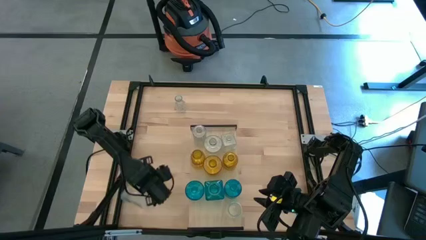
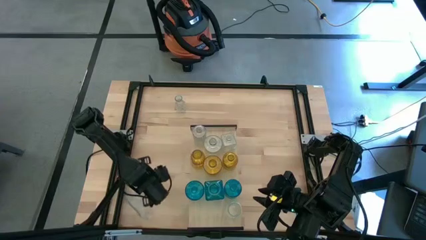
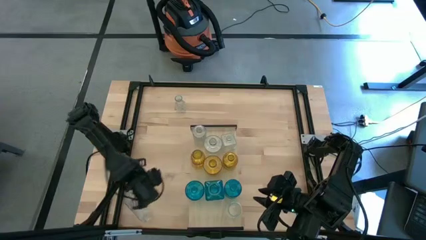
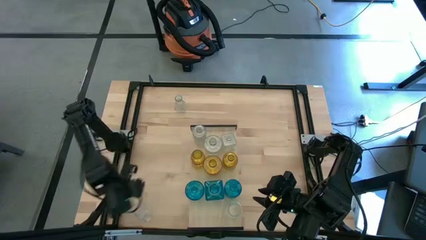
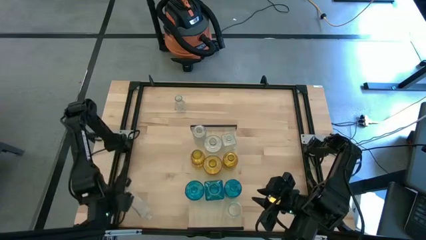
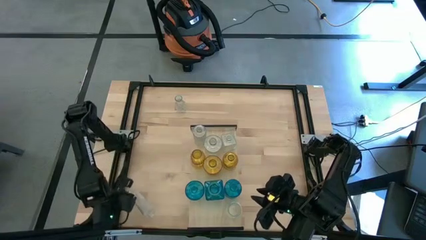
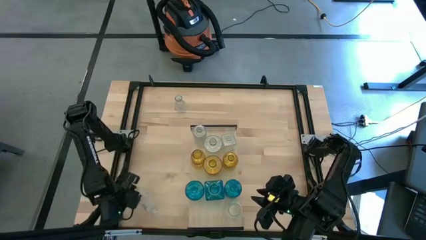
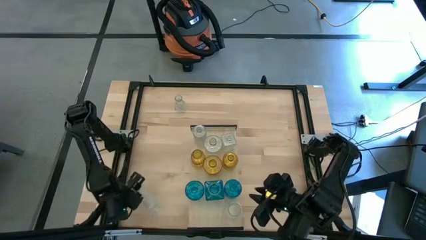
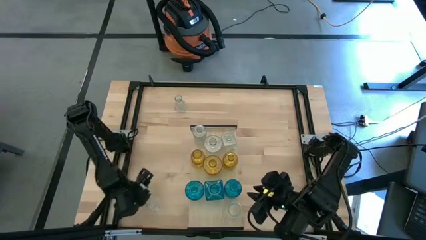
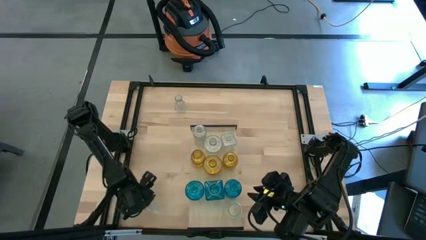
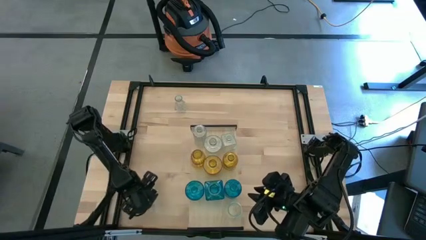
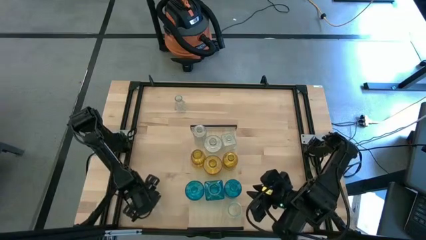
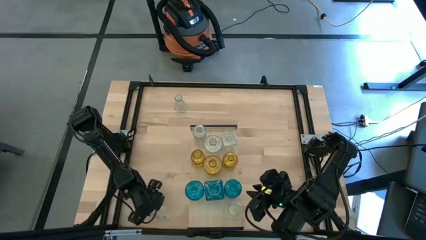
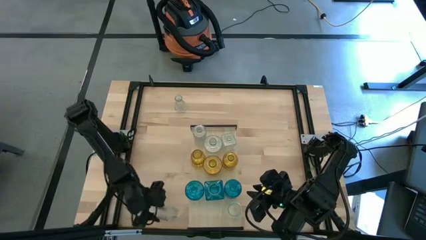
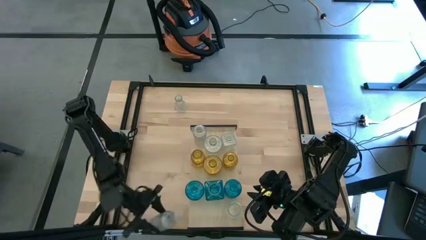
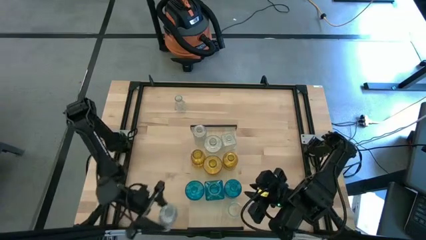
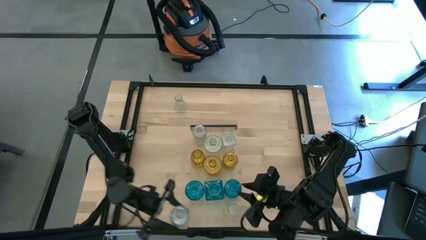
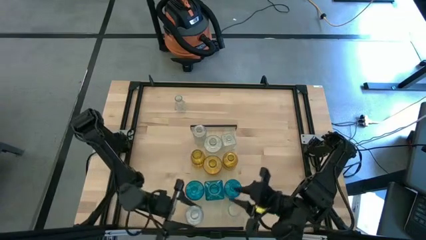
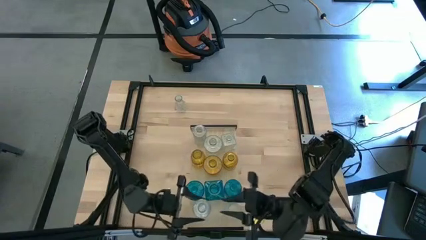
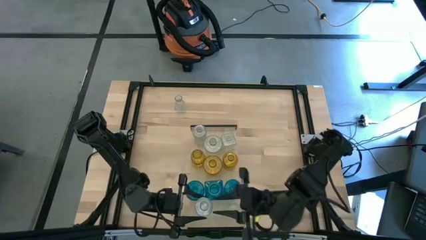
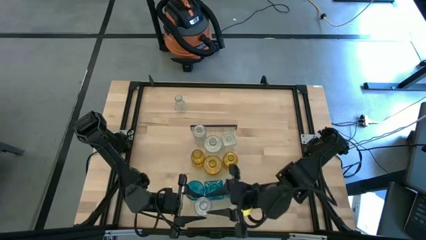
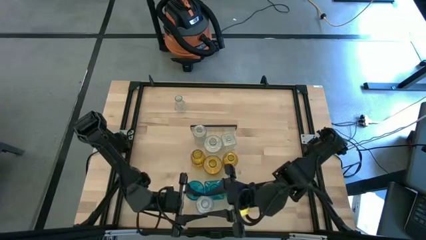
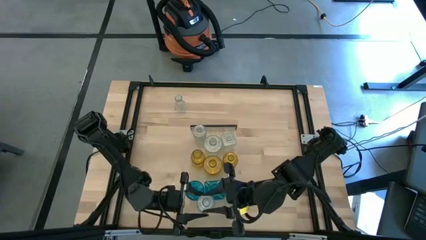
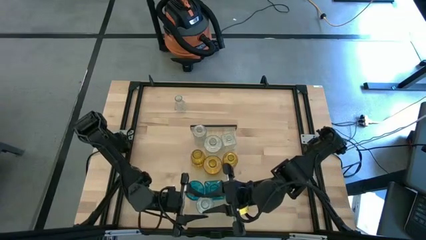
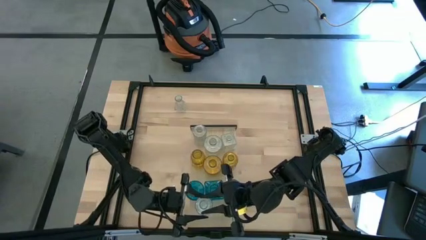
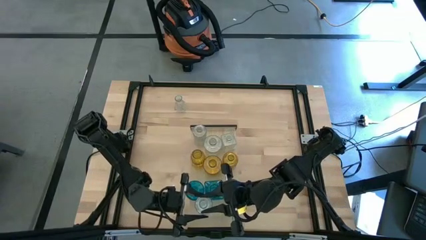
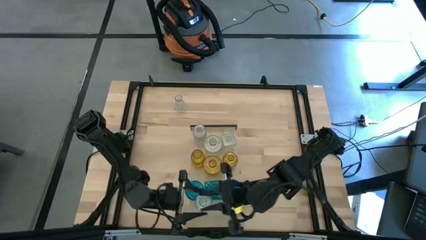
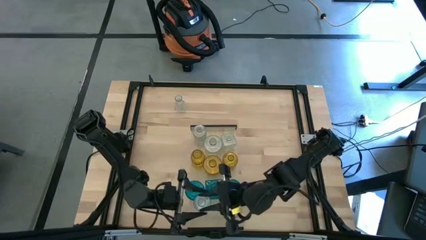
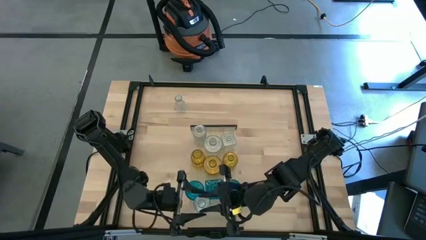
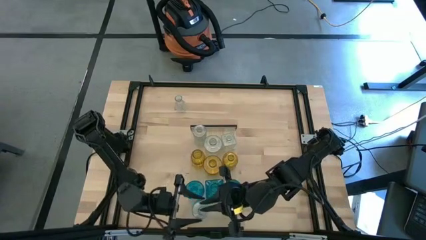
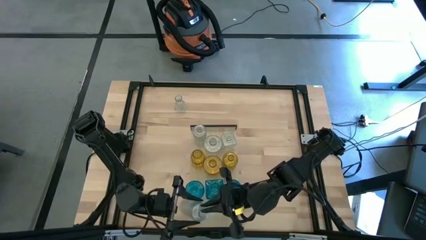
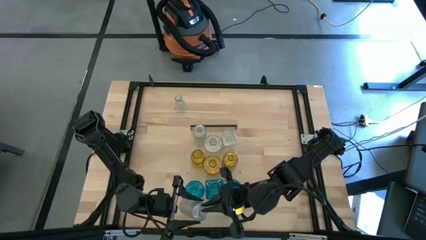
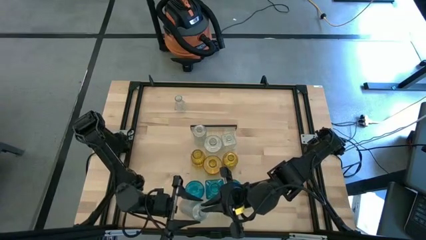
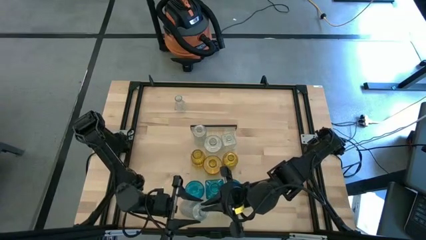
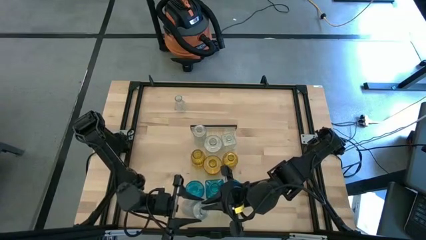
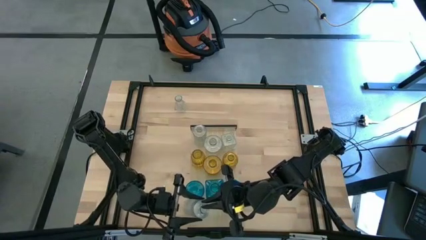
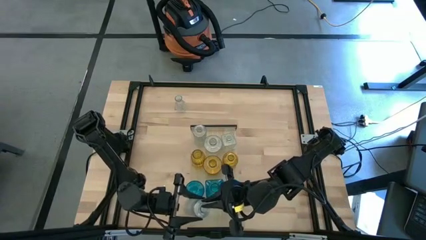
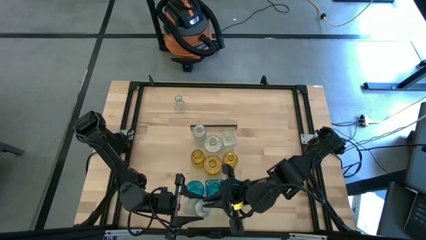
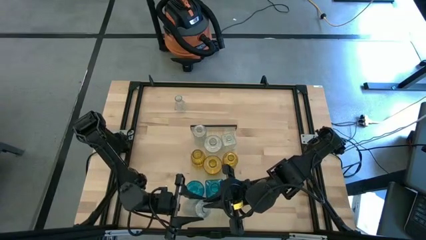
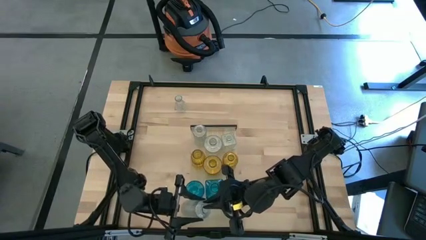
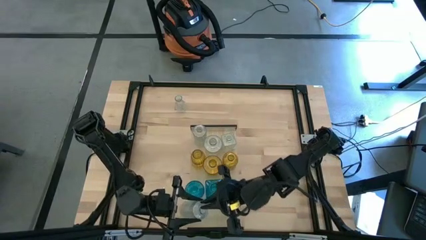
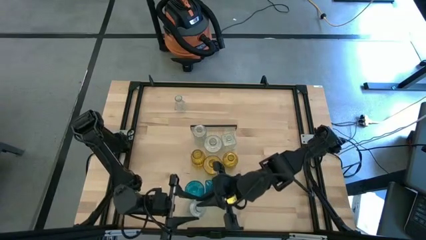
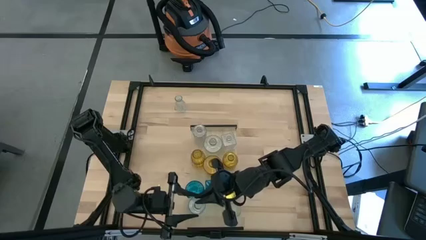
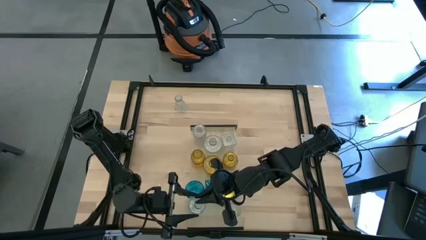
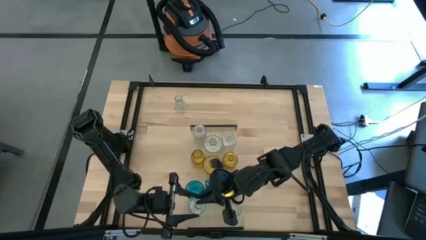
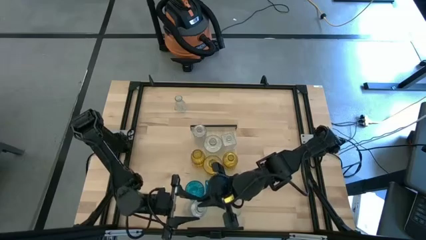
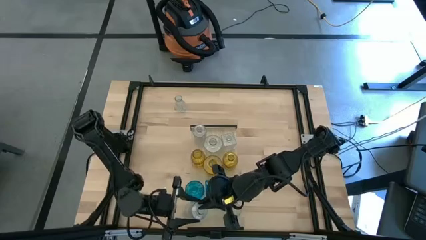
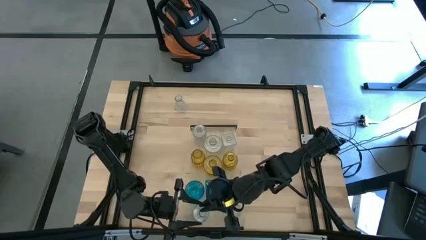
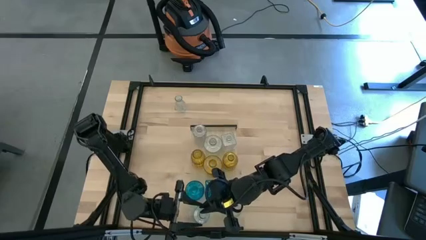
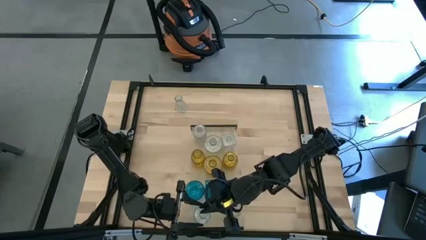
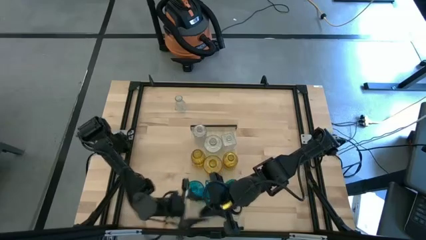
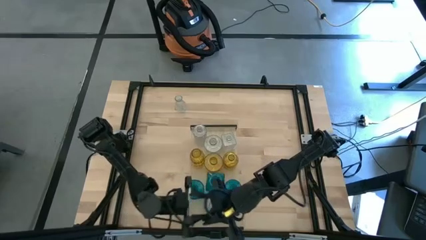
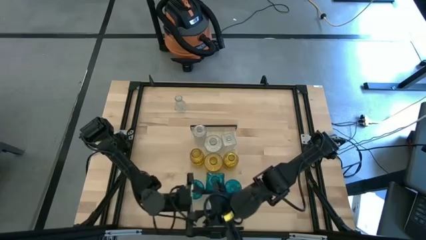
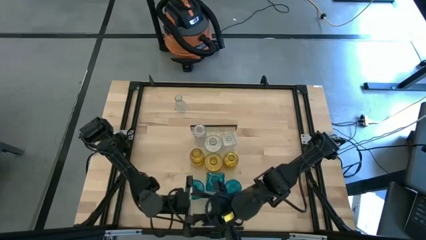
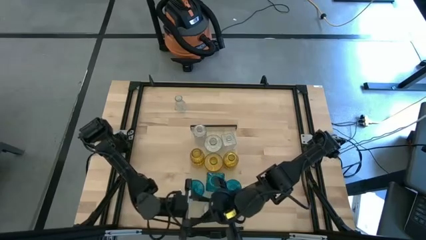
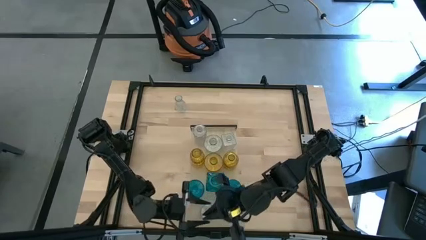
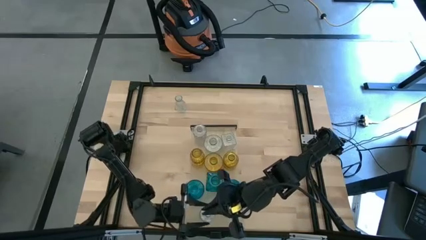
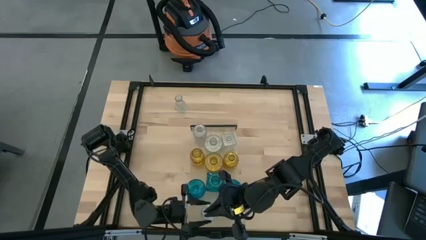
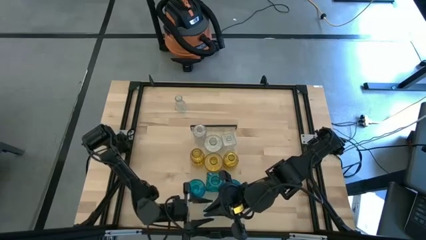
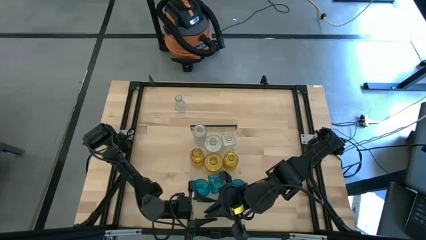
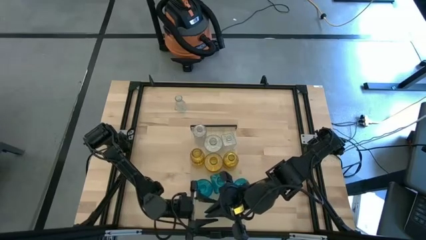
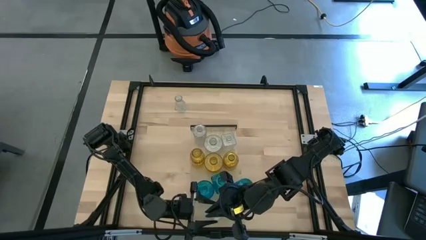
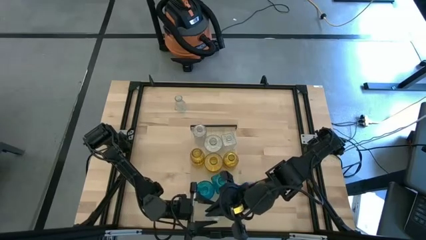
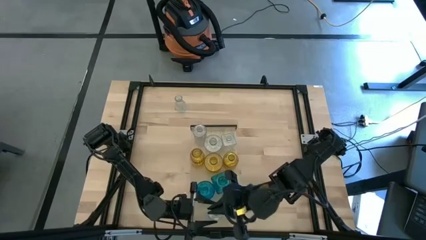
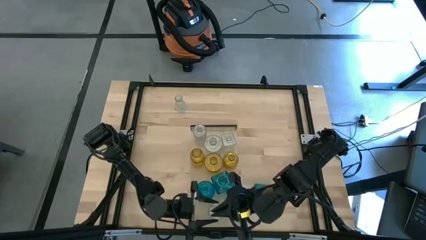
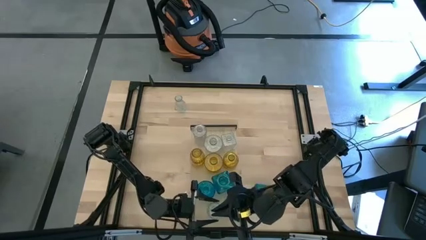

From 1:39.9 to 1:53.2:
Task: sort vases onto shelf
Put the transparent vase on the shelf aligned with the other transparent vase

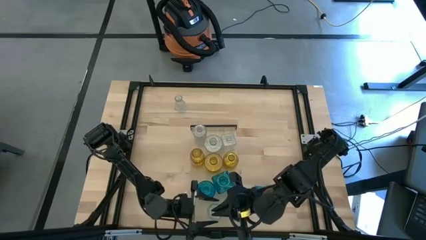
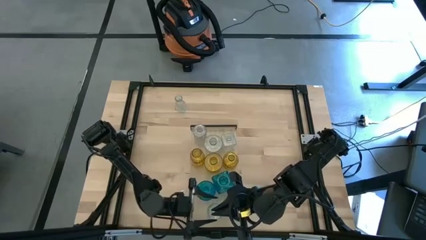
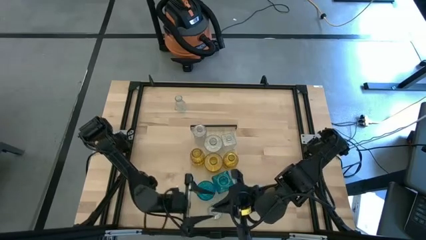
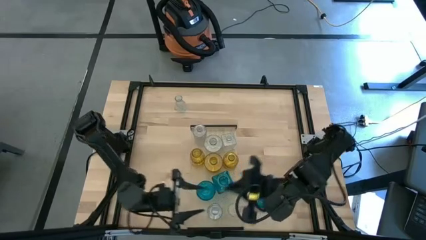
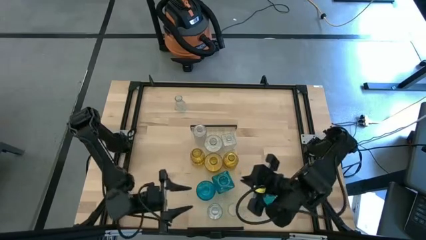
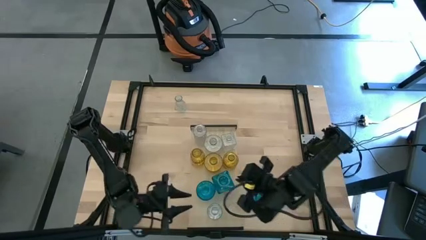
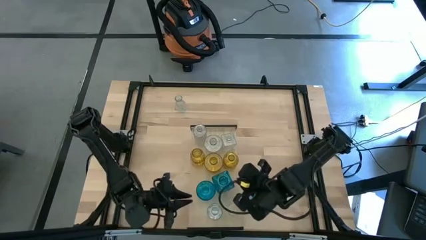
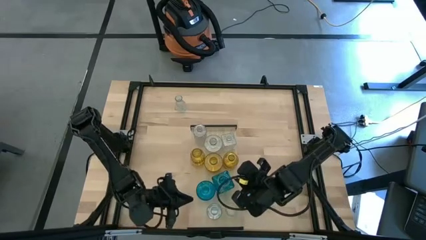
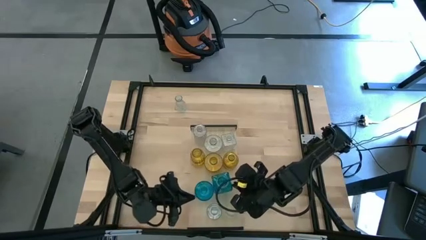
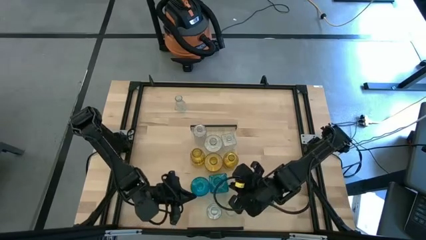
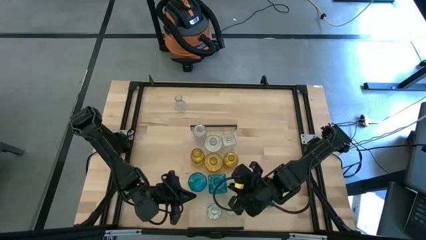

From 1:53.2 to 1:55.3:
Adjust the blue vases on the shelf
